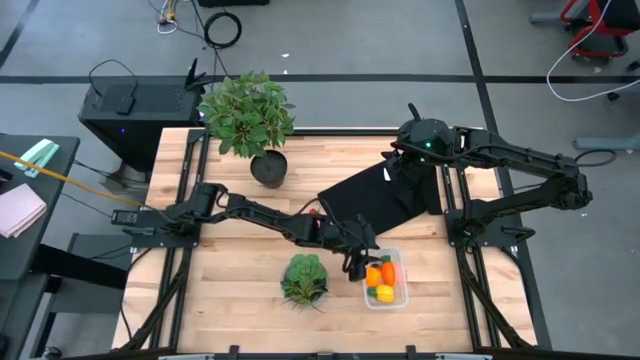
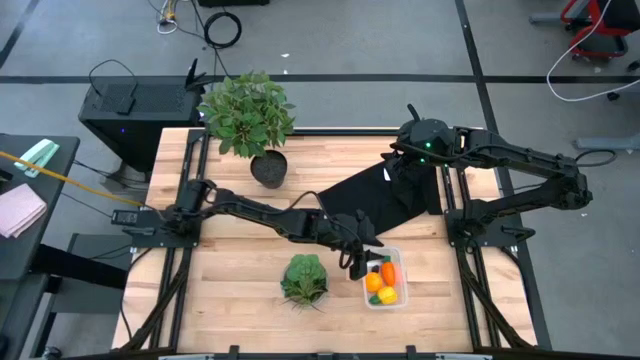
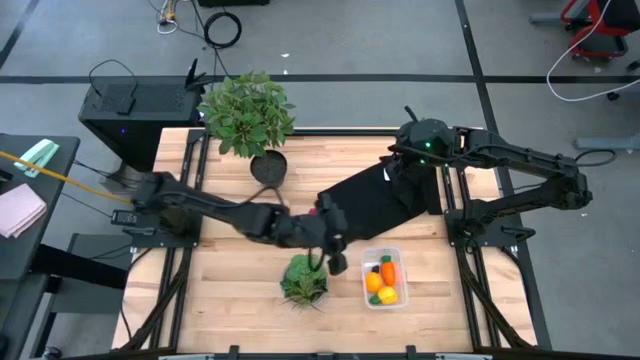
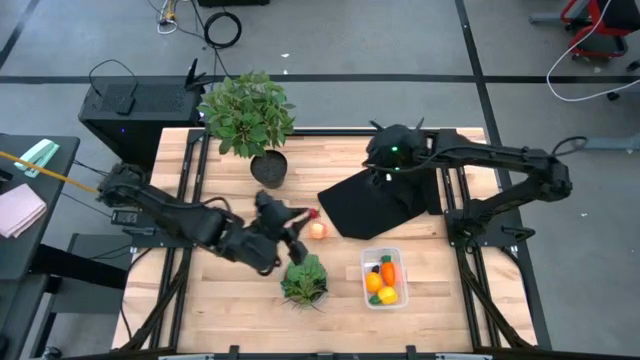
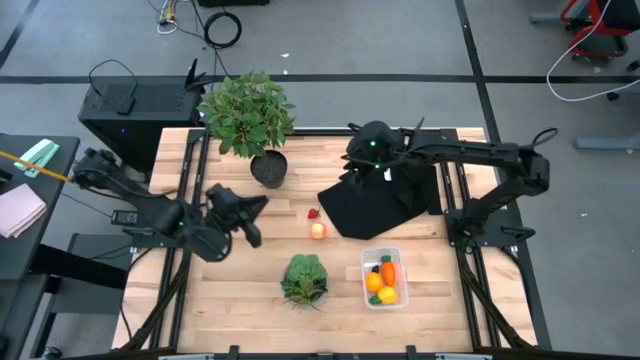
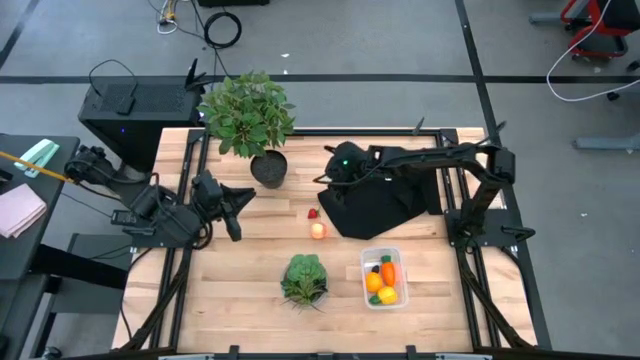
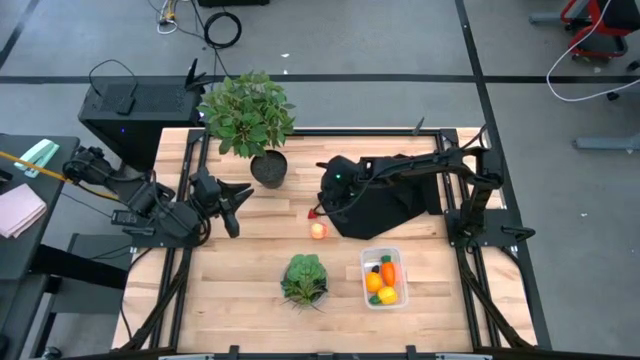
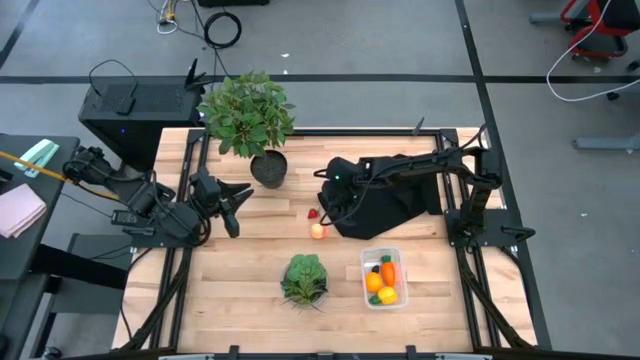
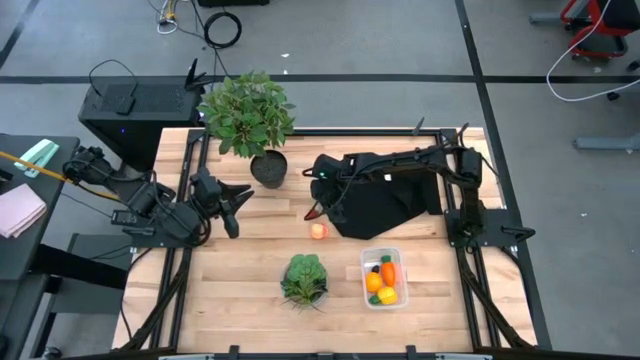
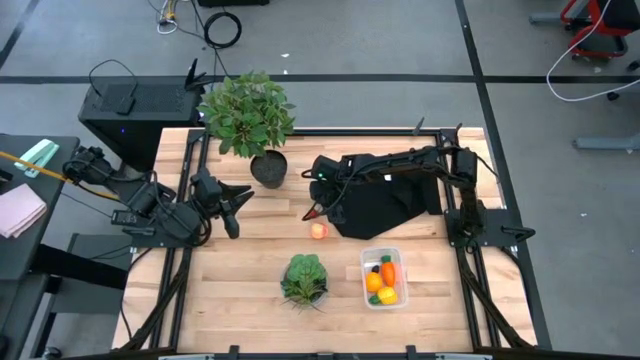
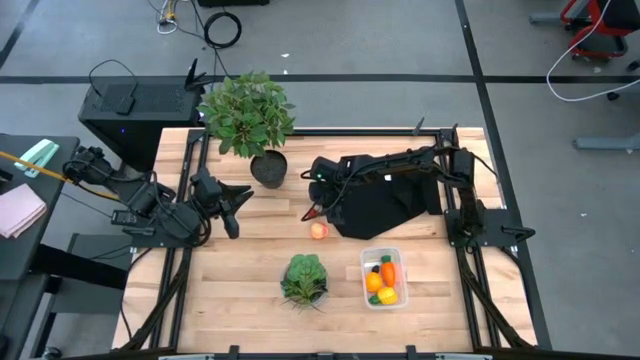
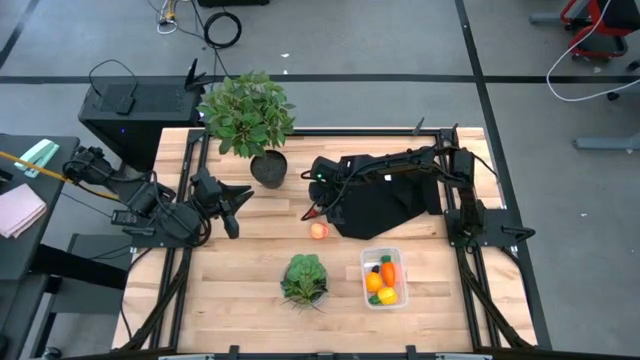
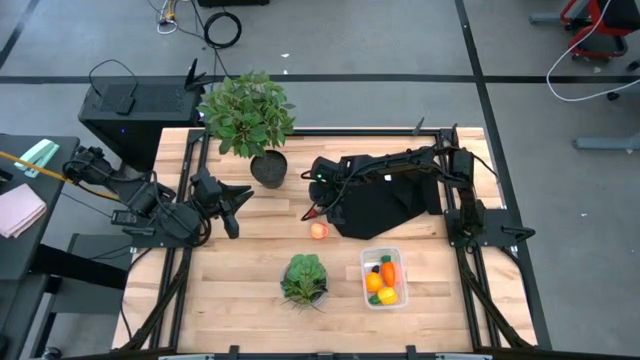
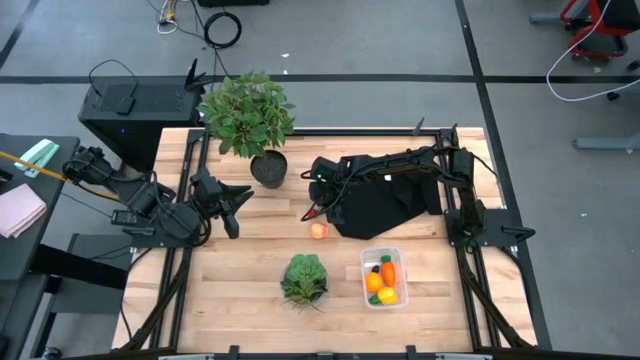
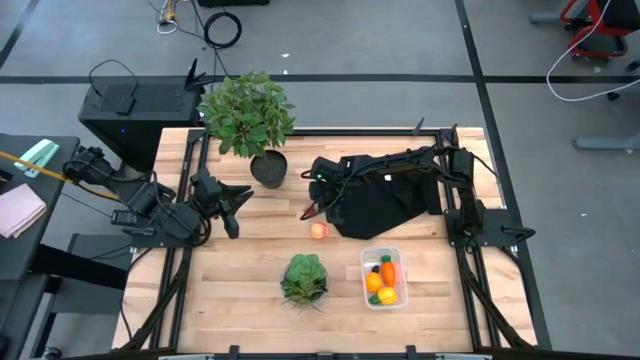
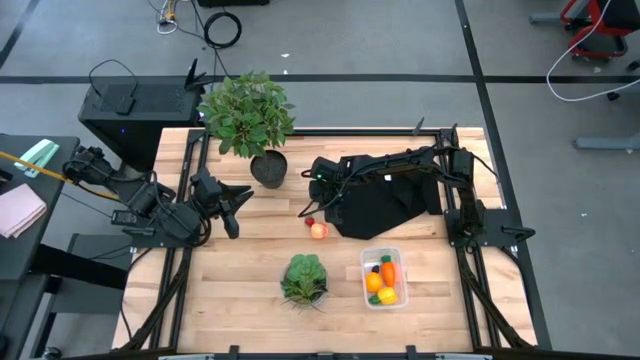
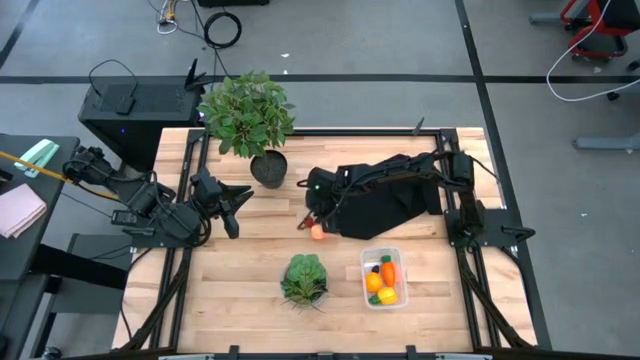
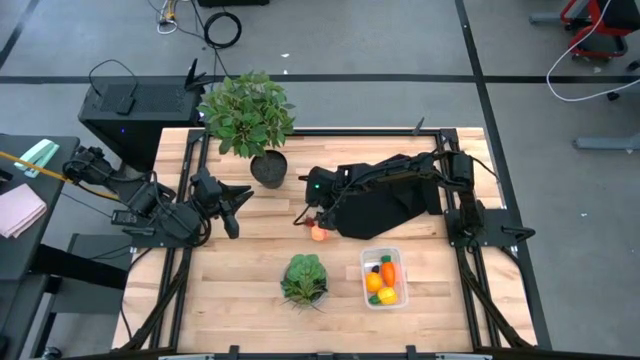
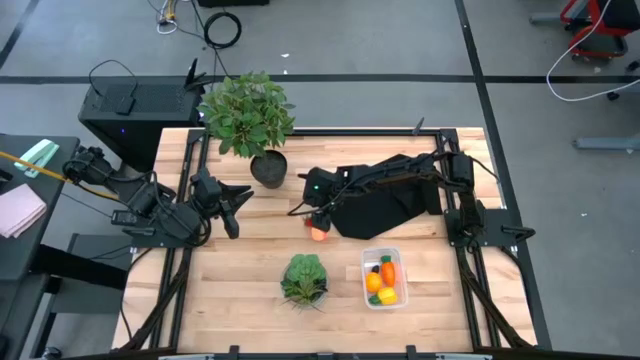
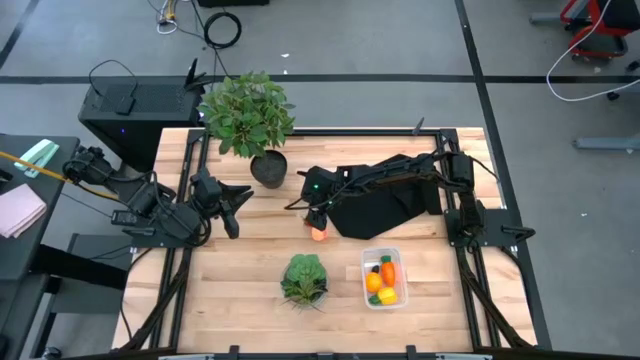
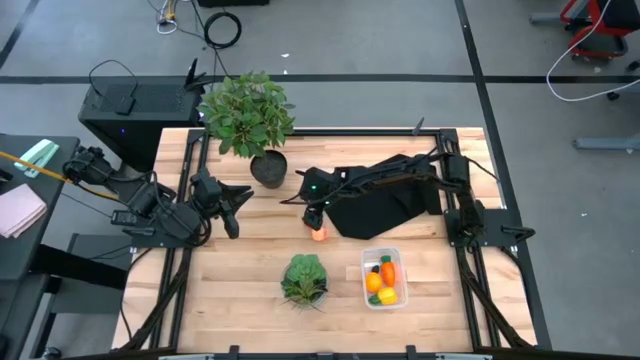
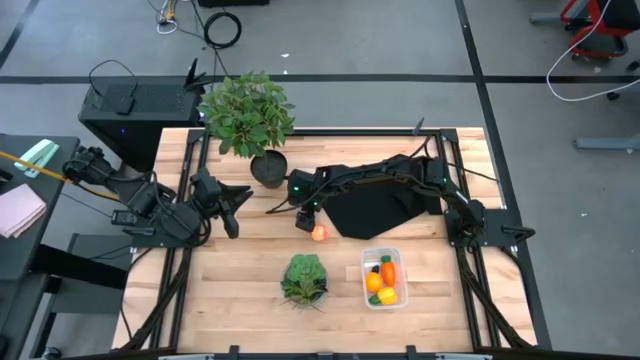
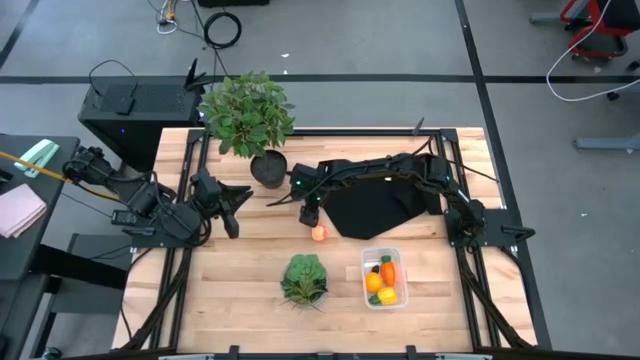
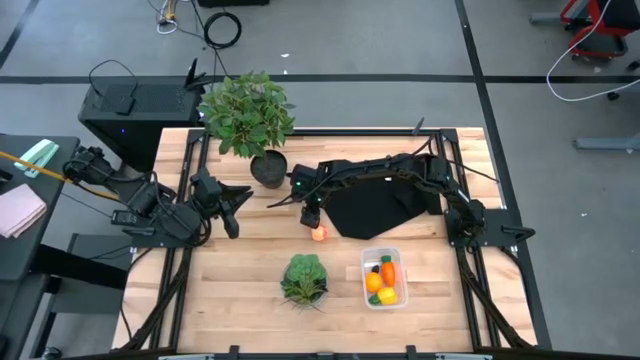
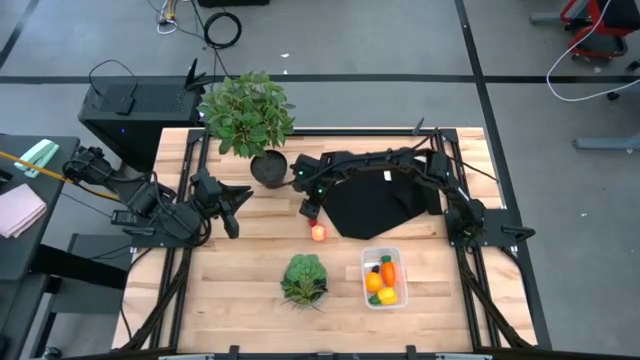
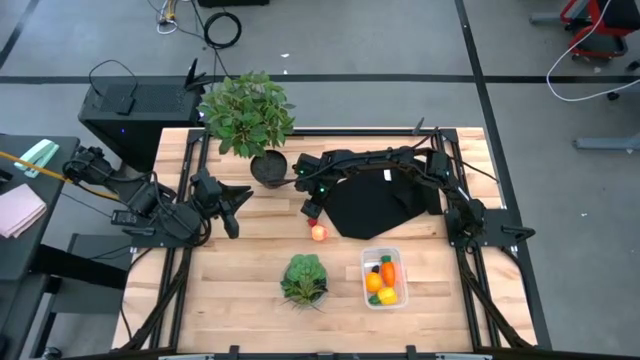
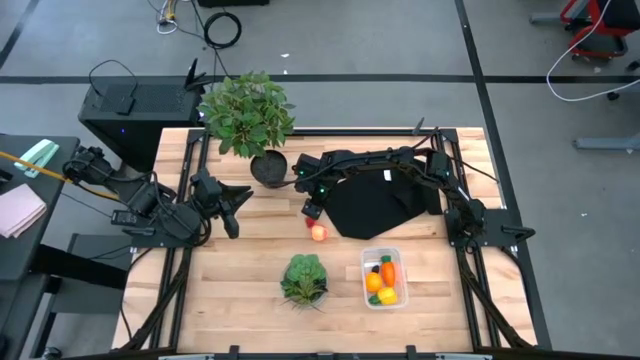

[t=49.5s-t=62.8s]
Task: Pick and placing Produce into tupperware
Put the strawberry into the transparent bin

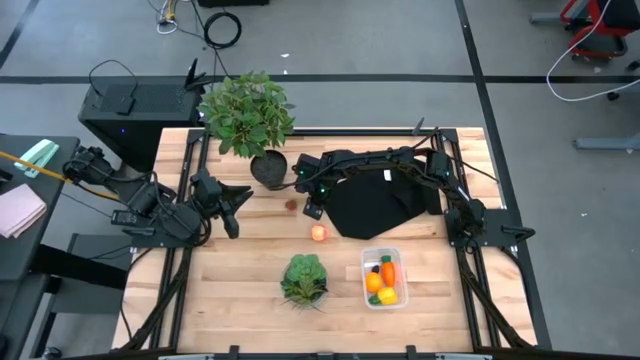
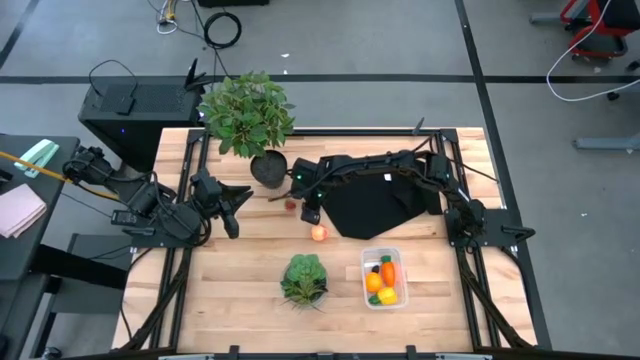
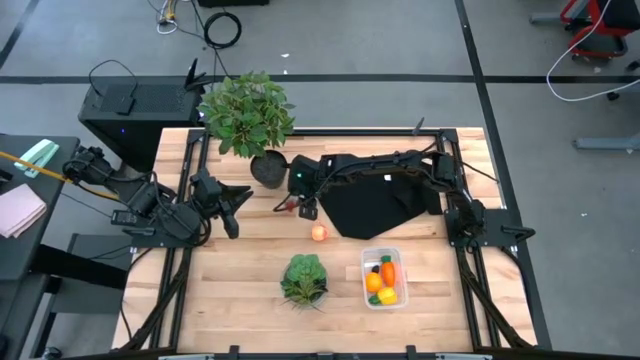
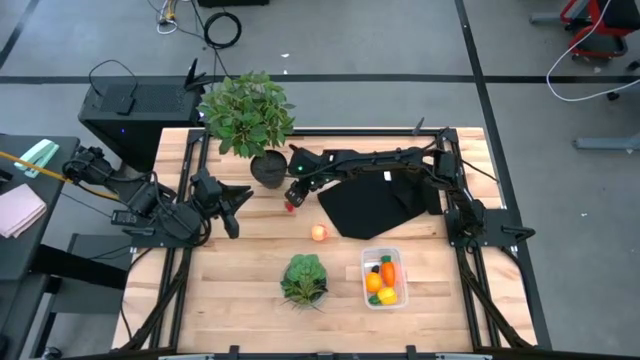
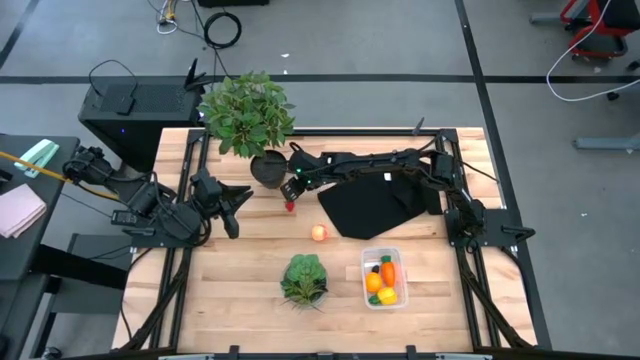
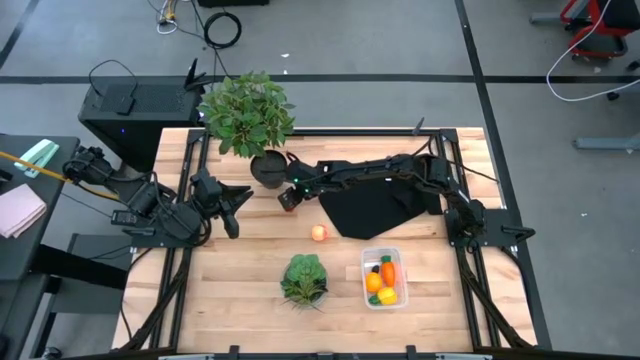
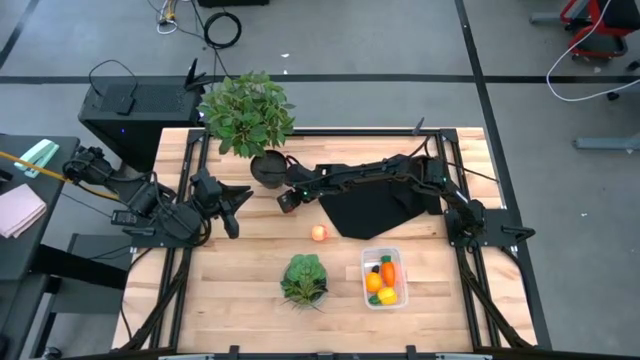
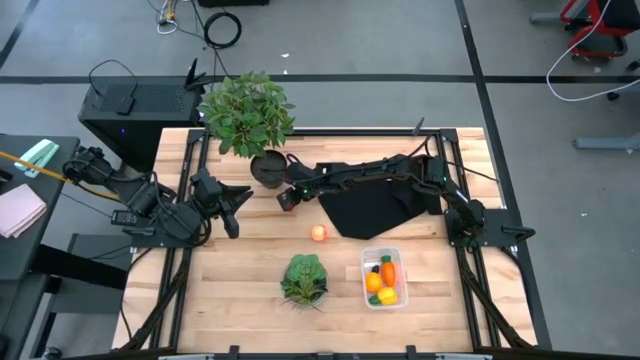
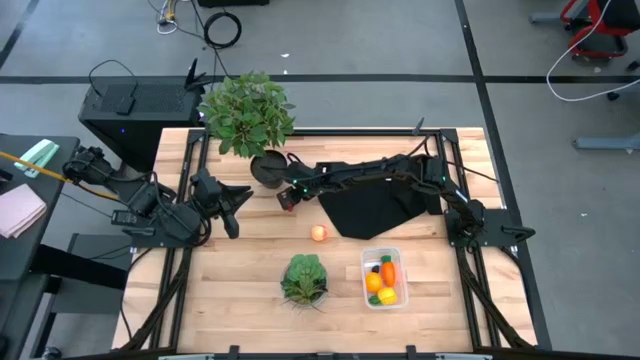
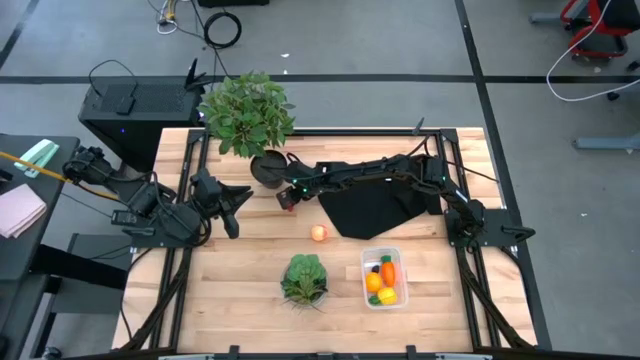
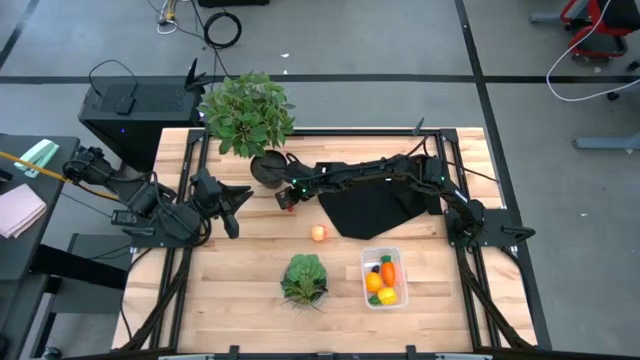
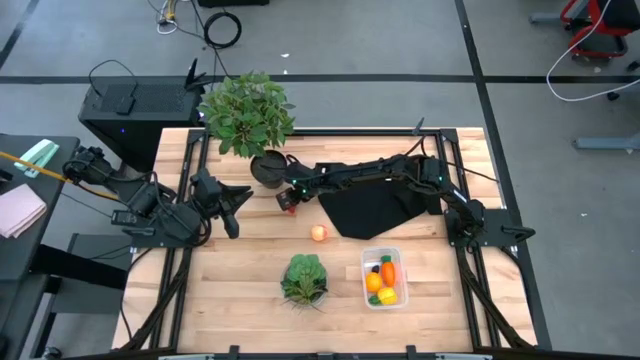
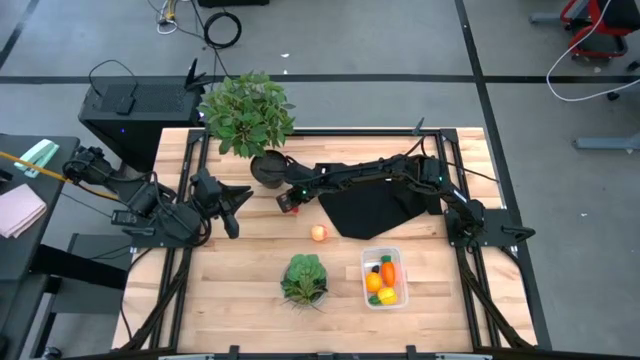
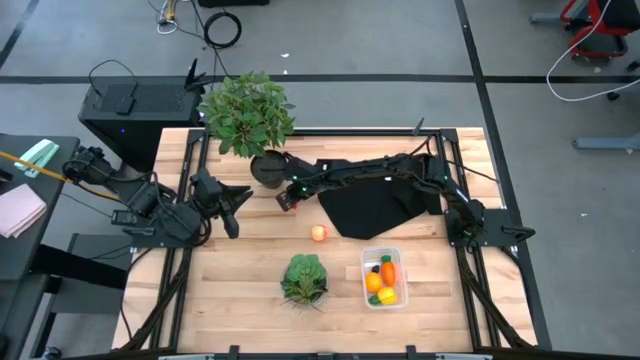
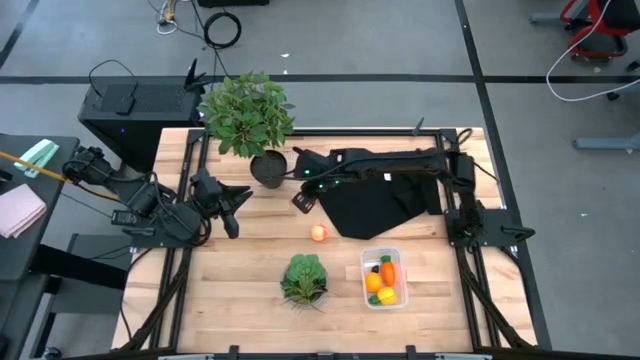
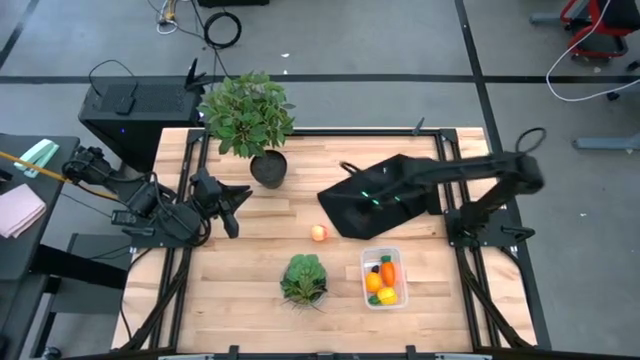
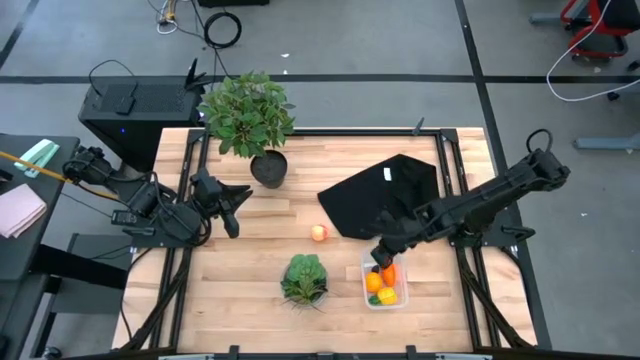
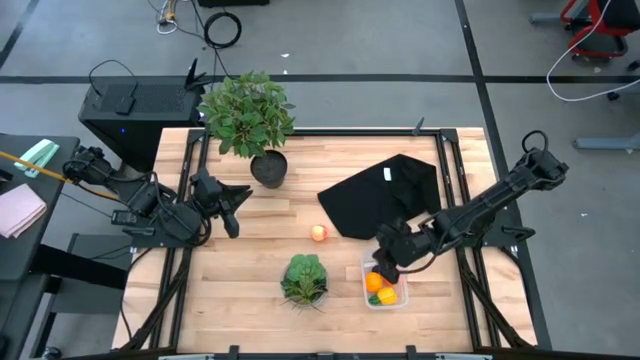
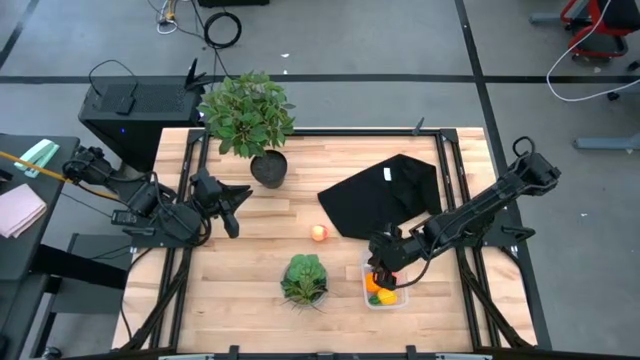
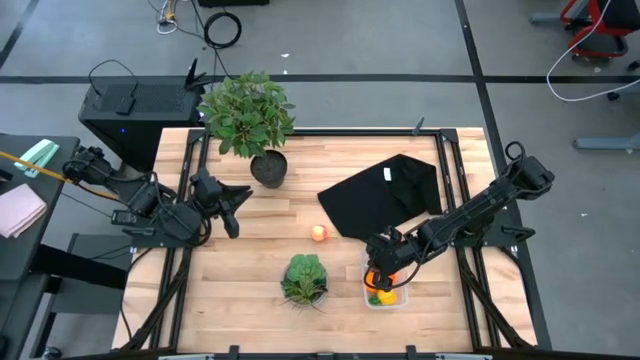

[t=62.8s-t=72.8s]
Put the strawberry into the transparent bin
